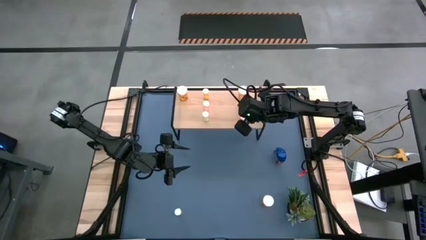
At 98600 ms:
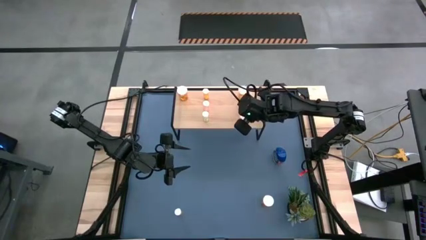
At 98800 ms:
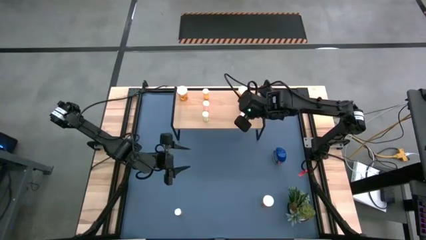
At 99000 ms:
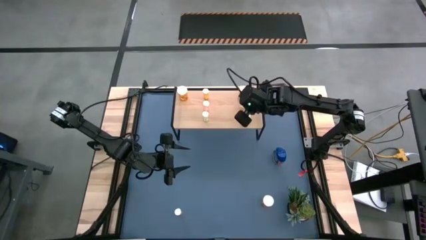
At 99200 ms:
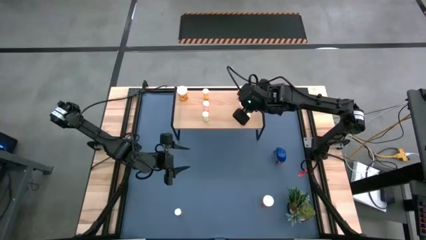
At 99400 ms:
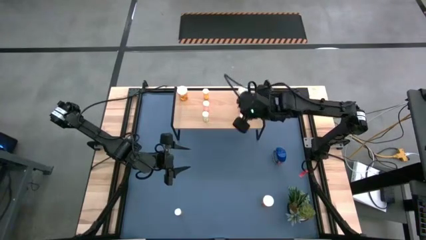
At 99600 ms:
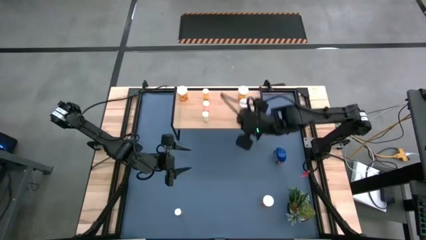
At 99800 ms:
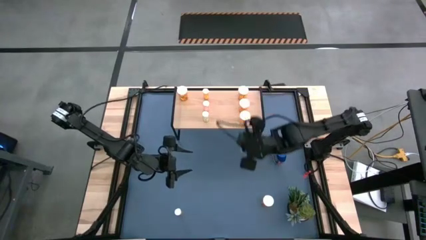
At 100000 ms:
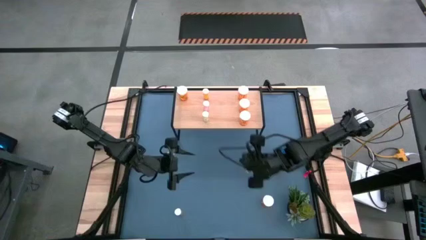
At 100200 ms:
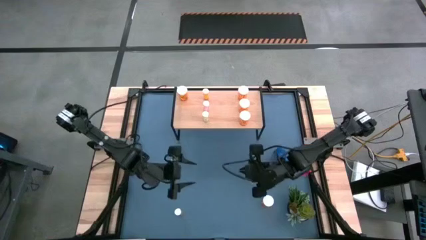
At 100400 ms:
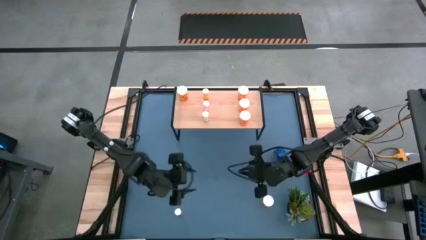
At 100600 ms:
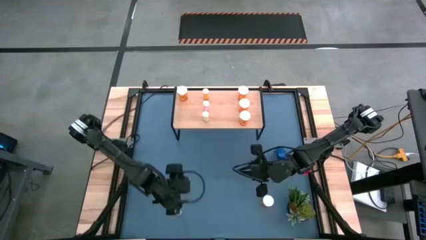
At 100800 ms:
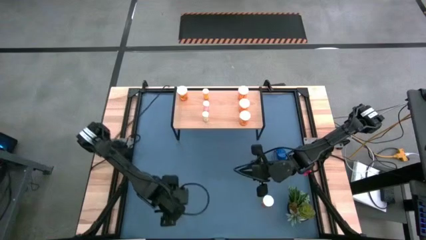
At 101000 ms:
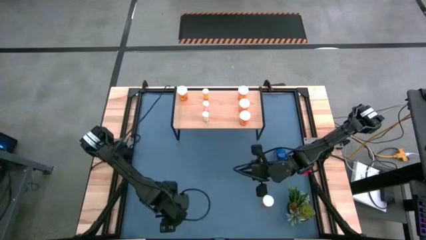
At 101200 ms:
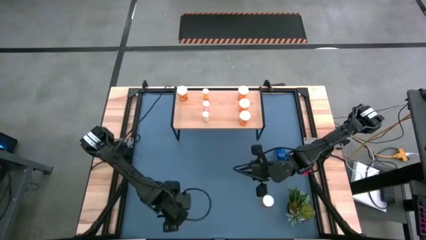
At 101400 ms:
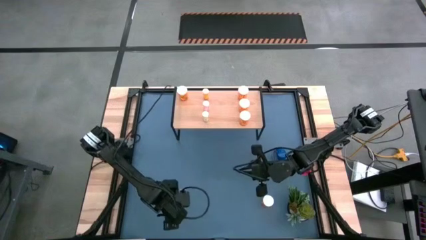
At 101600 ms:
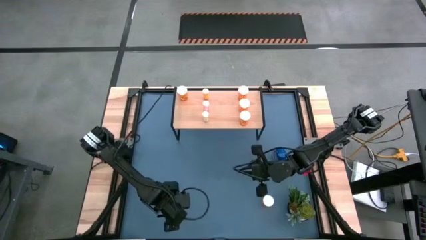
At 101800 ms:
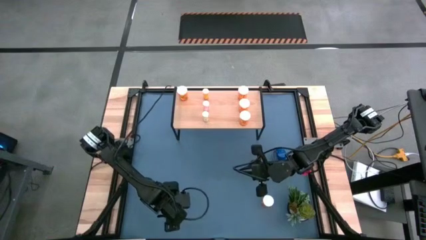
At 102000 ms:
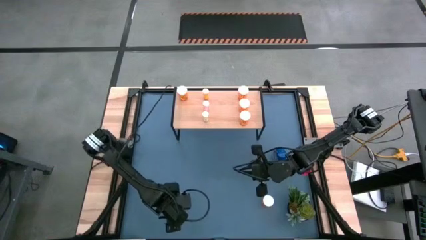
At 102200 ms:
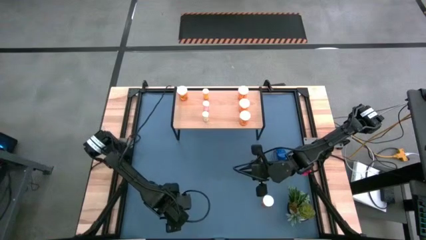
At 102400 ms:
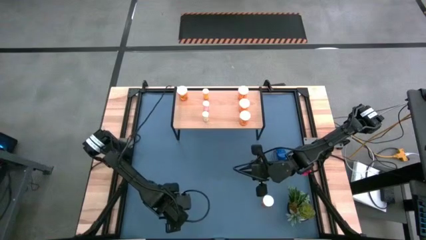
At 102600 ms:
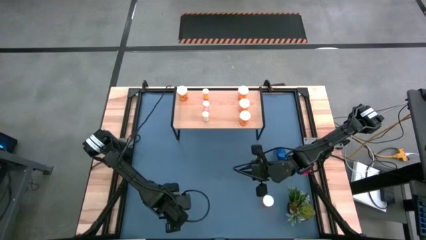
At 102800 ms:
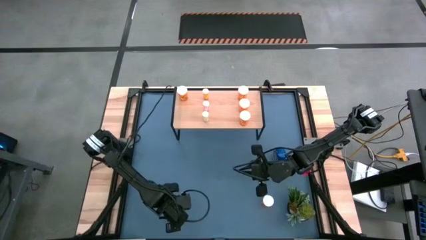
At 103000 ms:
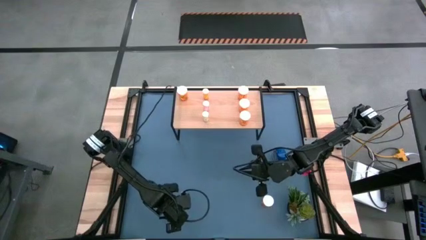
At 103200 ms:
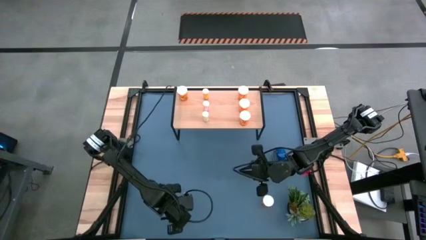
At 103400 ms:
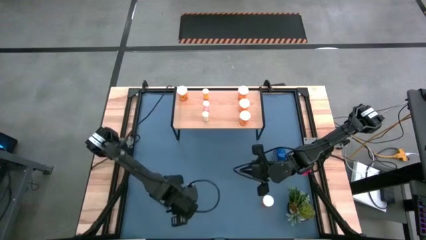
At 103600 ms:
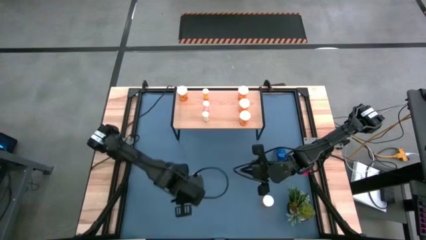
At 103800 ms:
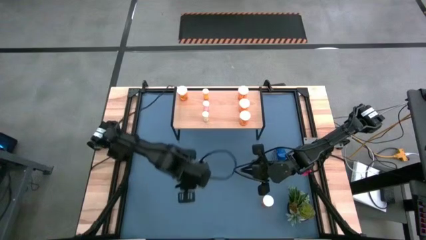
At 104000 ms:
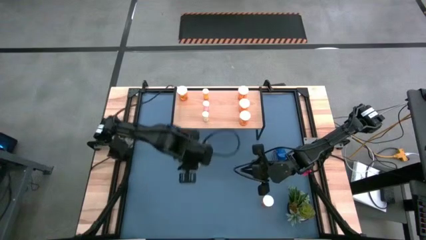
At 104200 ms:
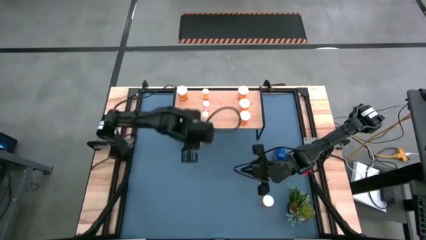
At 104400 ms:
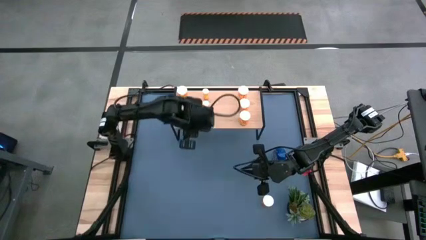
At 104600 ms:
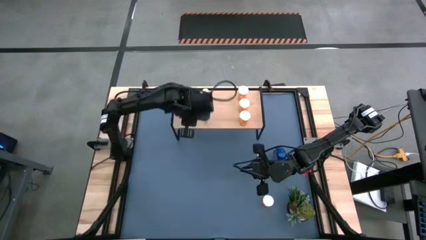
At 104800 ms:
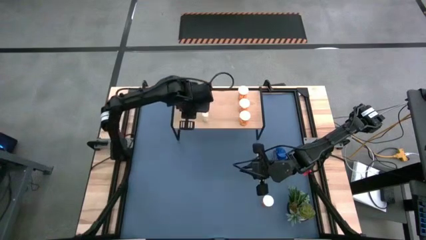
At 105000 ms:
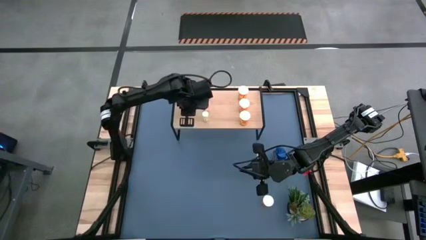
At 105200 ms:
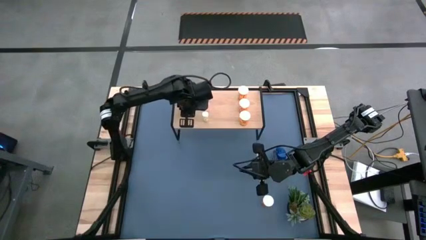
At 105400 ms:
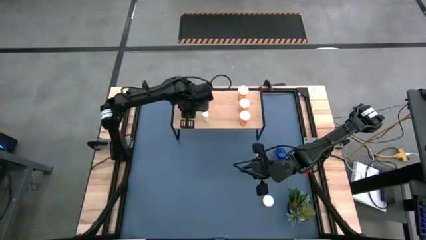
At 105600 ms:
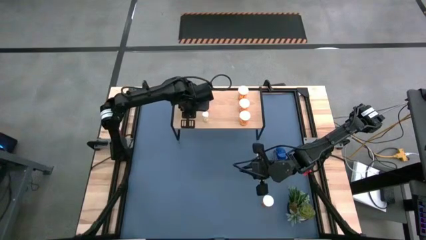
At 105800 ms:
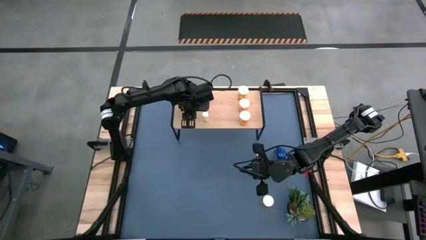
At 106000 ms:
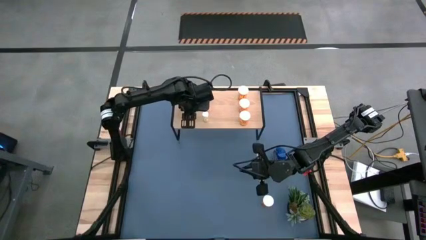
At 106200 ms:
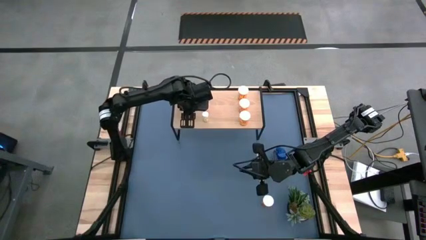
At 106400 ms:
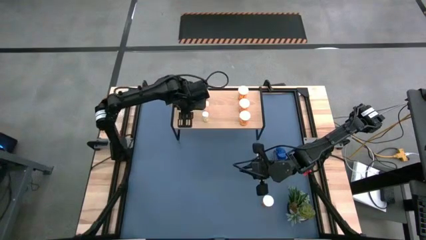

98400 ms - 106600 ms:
Task: Pick and place medicine bottles onto shelf by color
Put the small pill bottle on the shelf

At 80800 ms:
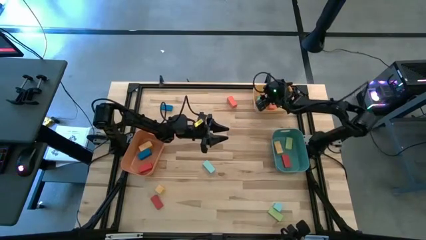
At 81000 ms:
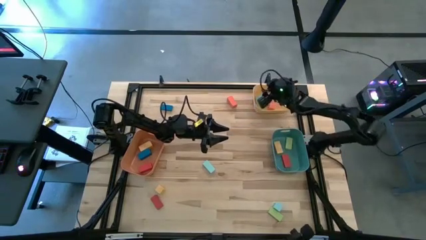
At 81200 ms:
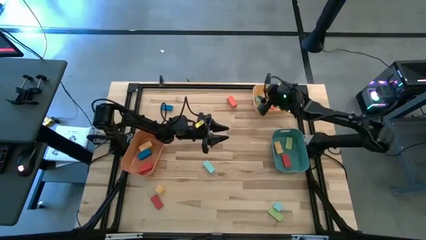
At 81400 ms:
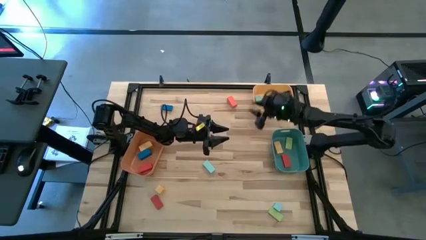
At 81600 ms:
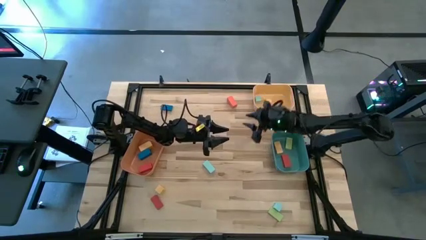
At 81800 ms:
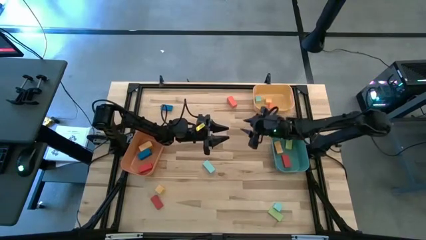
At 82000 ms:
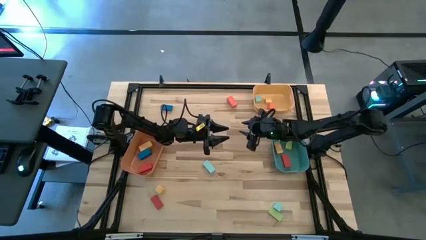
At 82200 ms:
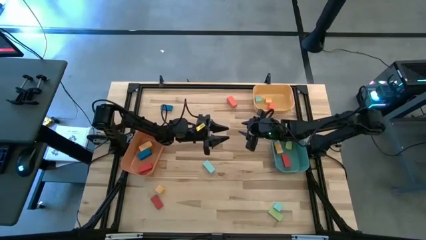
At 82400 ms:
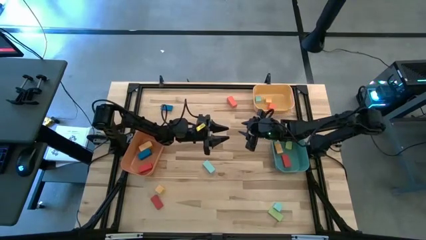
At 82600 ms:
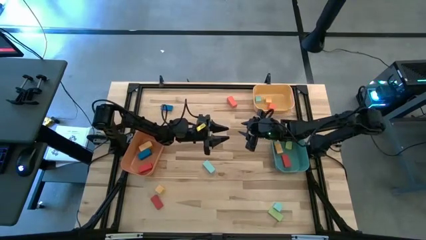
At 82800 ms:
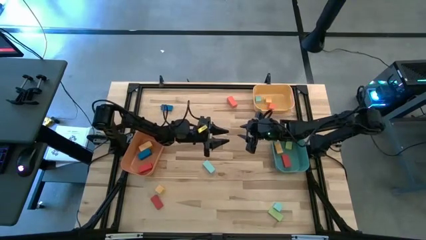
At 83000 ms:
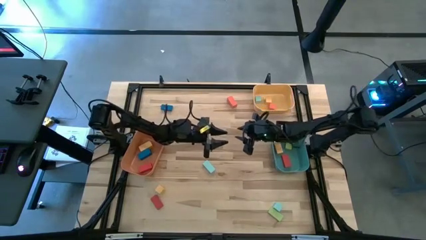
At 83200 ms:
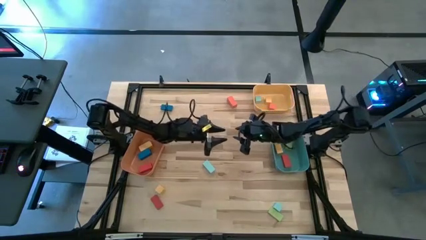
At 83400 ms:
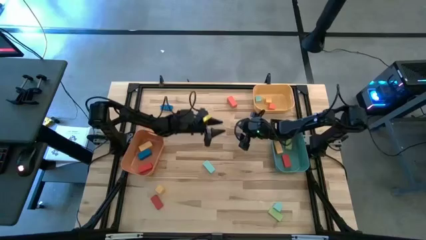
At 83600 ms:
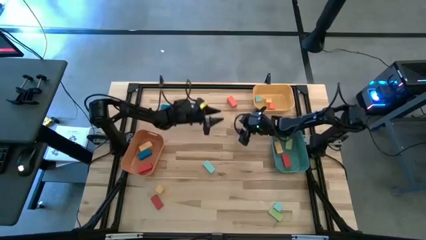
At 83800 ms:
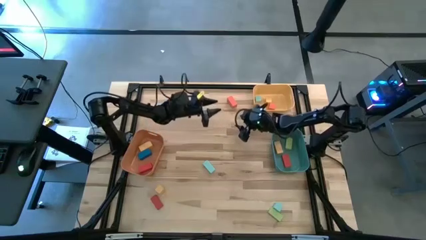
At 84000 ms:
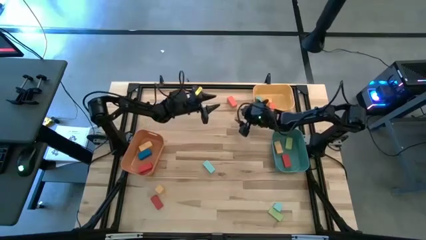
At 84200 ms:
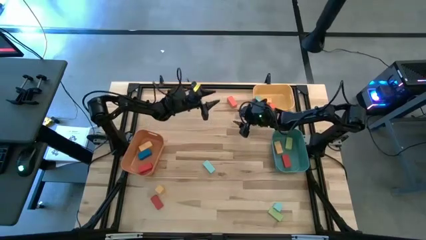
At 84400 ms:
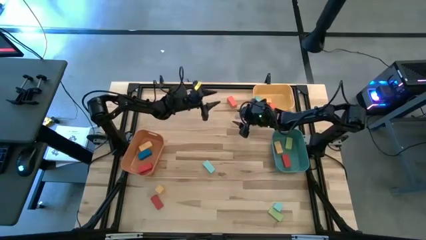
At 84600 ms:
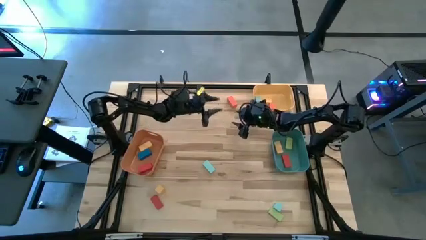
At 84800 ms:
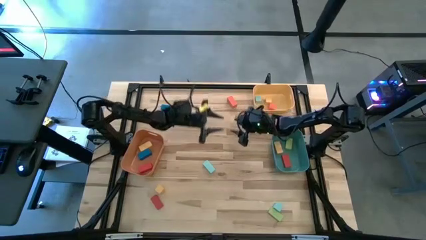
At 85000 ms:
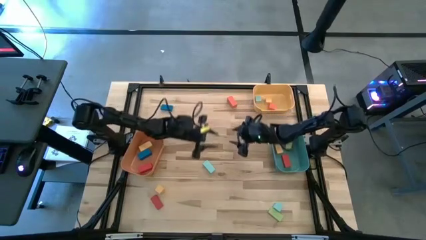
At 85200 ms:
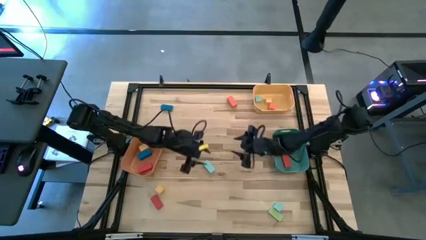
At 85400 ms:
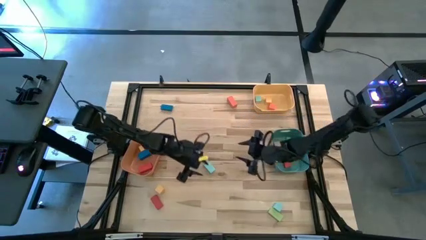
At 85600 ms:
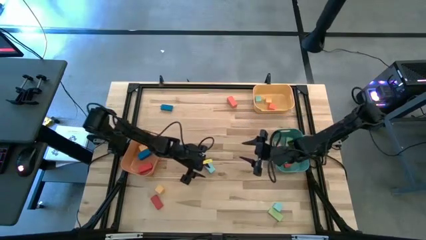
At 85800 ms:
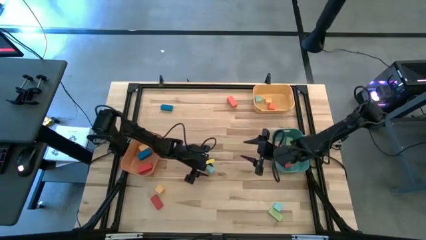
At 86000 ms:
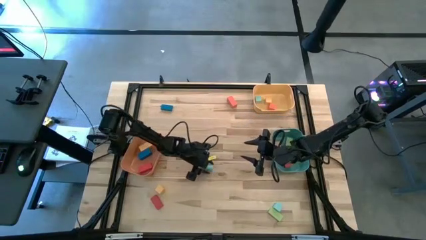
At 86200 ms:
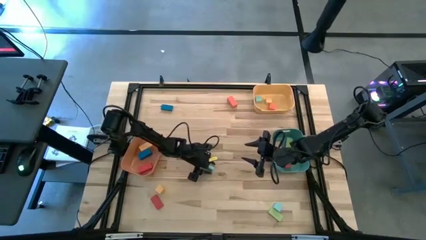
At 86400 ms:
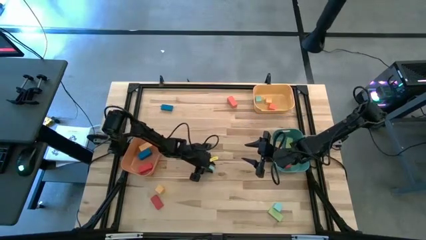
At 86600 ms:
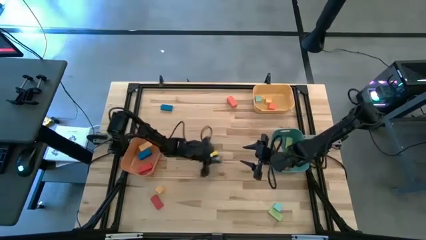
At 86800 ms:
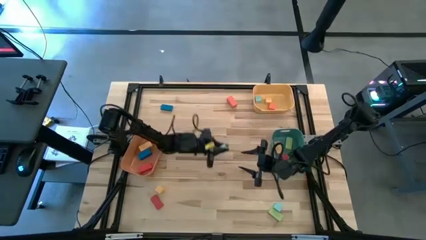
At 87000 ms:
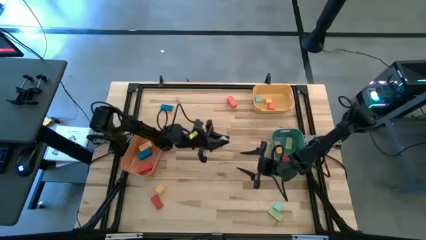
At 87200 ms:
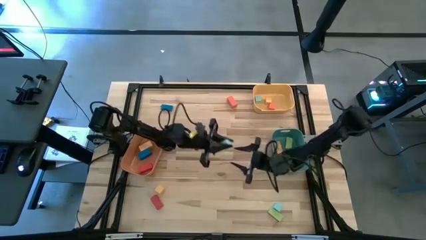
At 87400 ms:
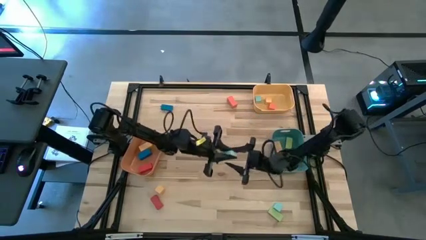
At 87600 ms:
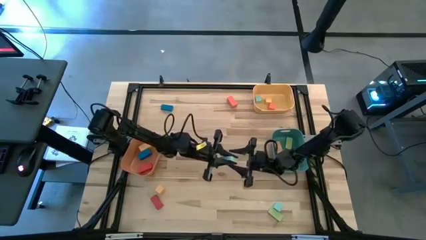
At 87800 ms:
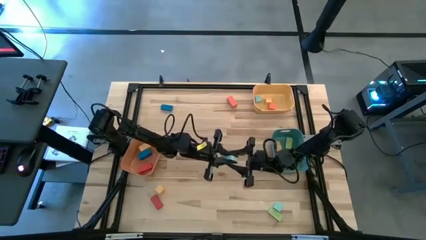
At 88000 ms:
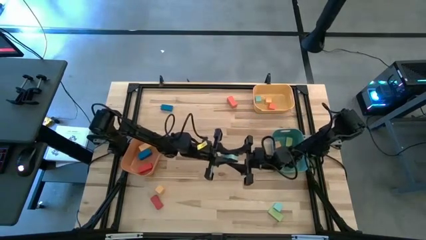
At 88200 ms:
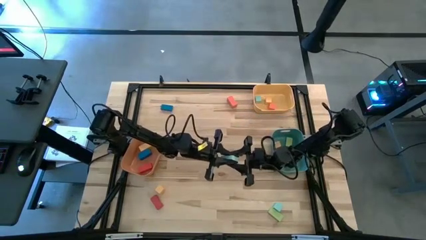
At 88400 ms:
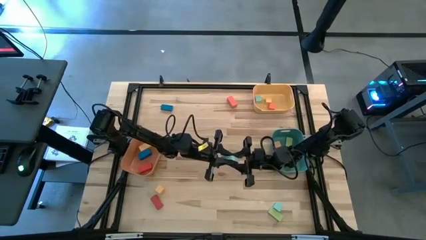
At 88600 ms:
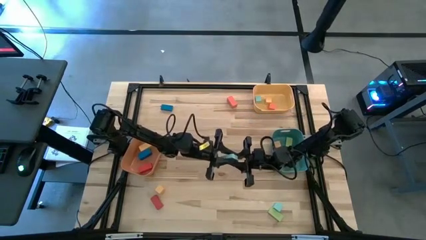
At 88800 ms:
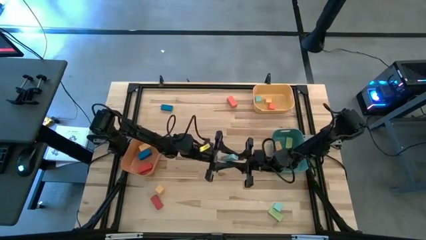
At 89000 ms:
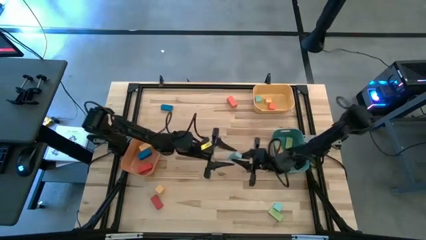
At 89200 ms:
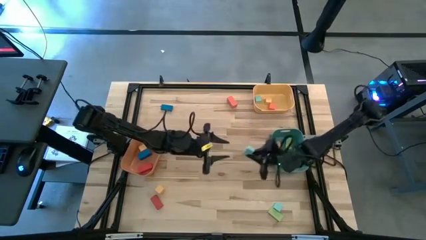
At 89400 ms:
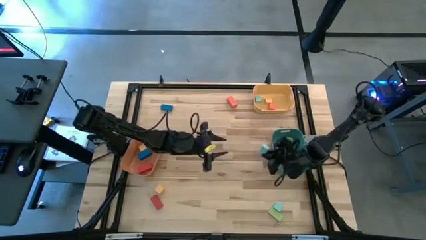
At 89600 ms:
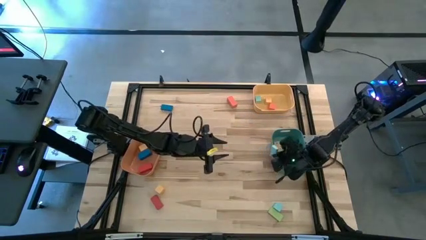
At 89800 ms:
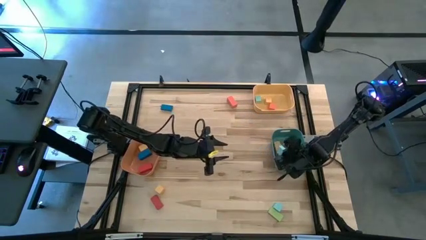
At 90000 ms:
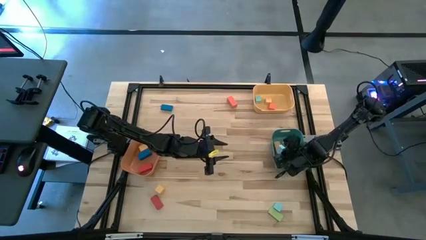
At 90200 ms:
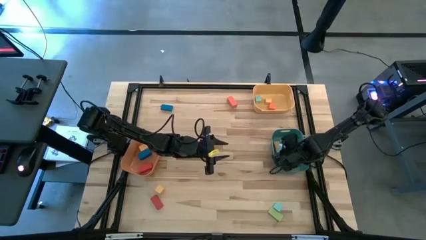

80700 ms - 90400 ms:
Task: Sort blocks by size
Put the thin light blue rectangular block into the green bin
